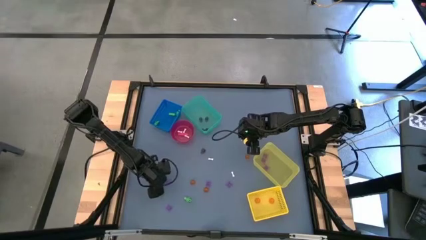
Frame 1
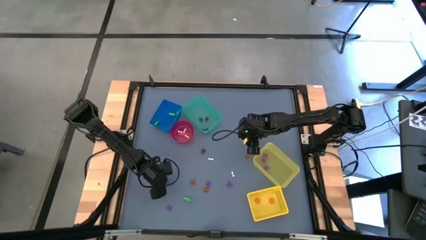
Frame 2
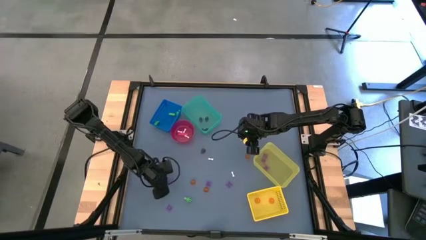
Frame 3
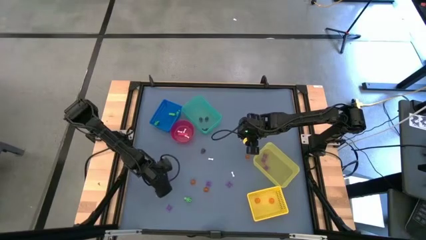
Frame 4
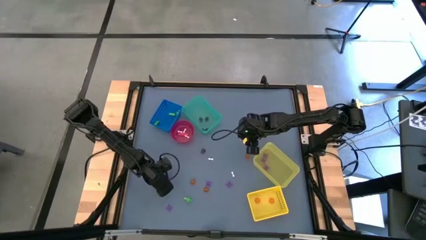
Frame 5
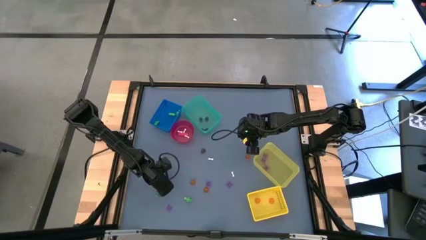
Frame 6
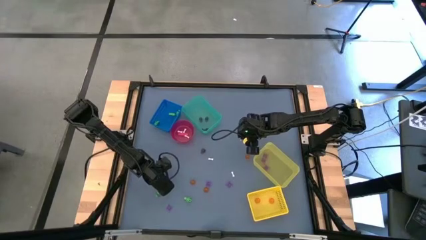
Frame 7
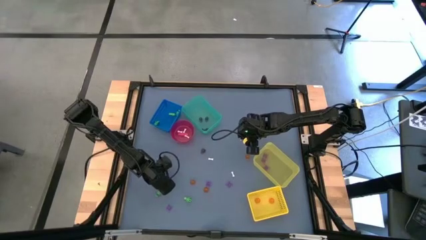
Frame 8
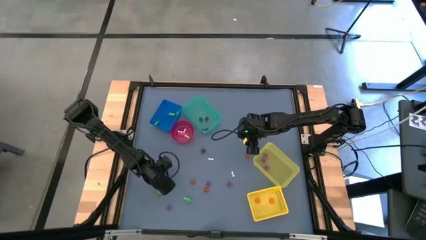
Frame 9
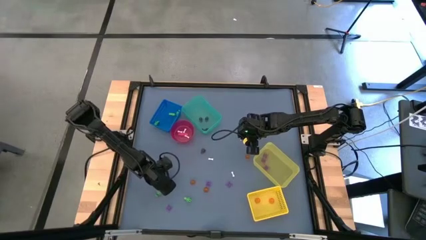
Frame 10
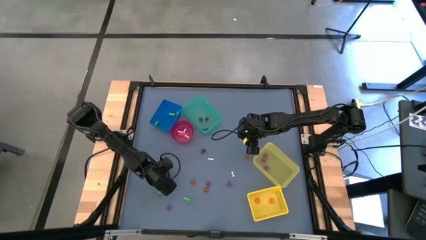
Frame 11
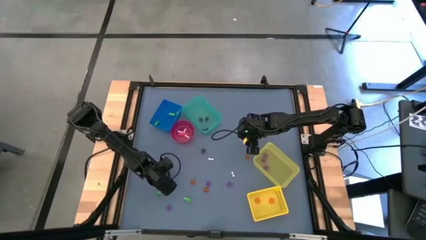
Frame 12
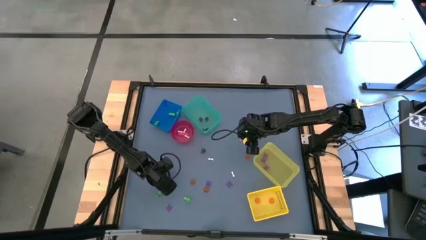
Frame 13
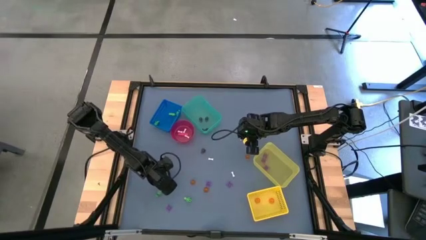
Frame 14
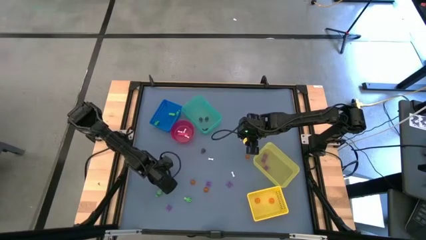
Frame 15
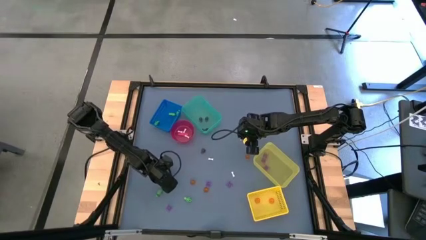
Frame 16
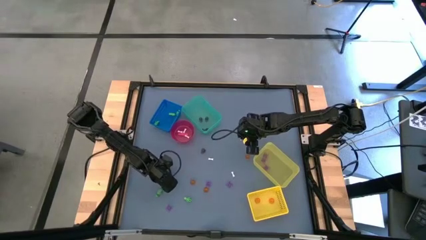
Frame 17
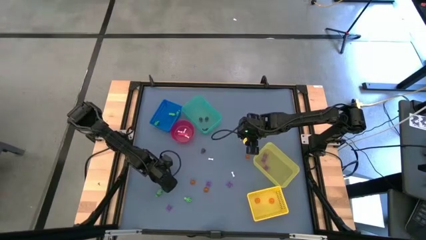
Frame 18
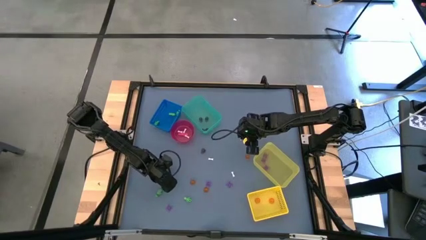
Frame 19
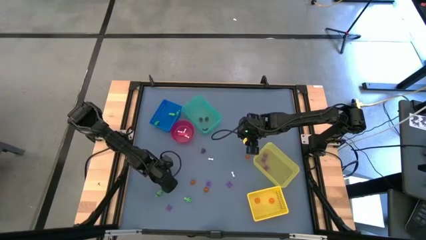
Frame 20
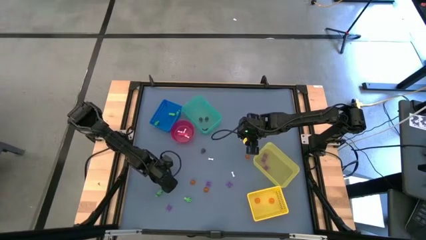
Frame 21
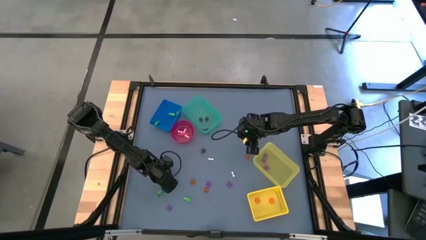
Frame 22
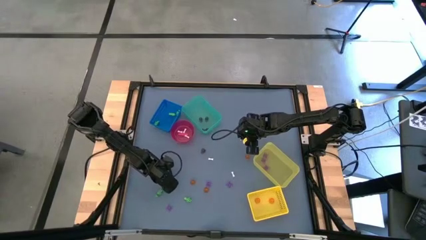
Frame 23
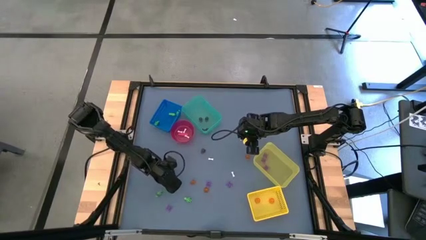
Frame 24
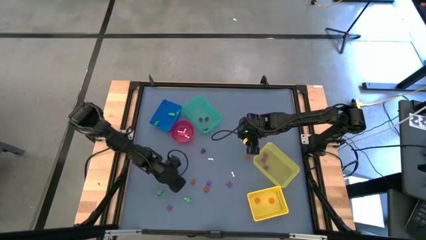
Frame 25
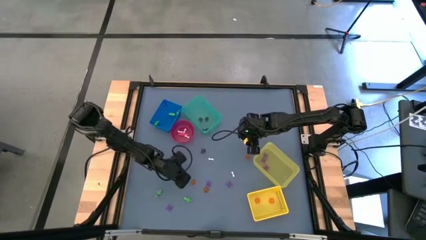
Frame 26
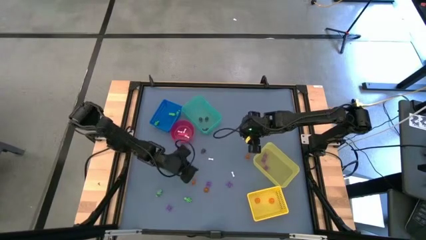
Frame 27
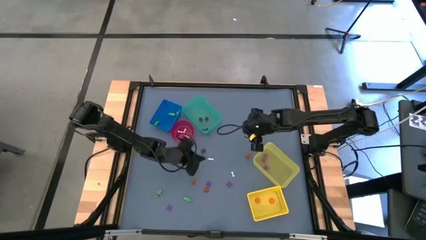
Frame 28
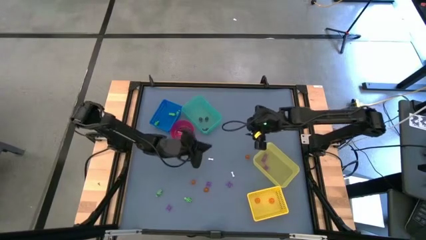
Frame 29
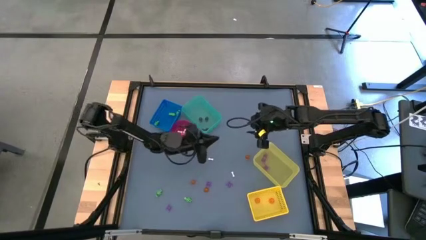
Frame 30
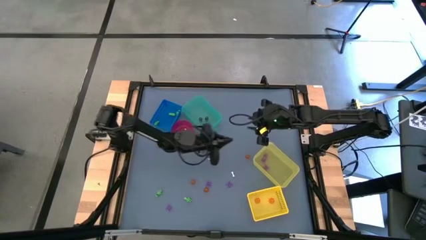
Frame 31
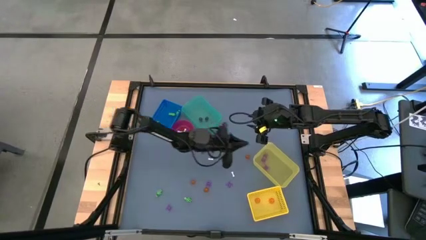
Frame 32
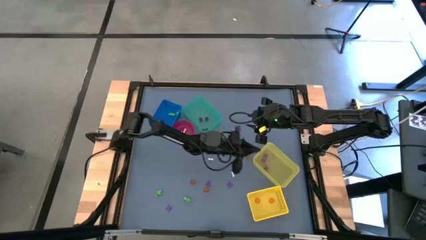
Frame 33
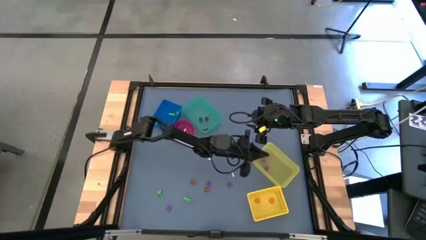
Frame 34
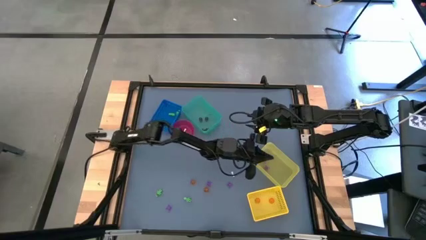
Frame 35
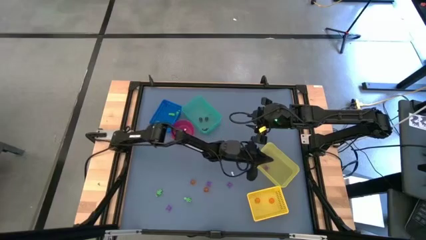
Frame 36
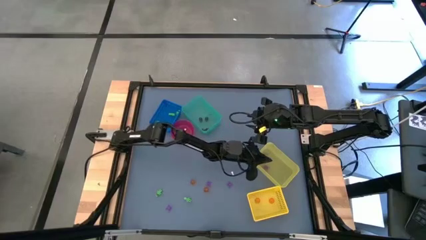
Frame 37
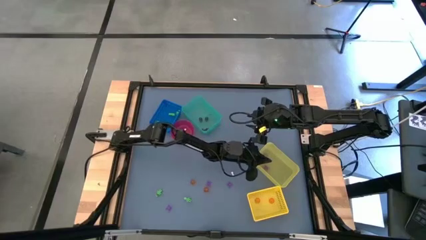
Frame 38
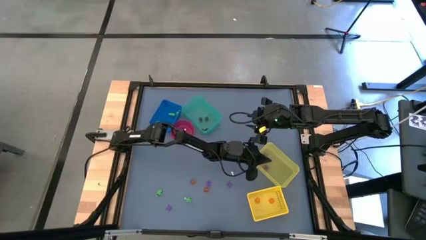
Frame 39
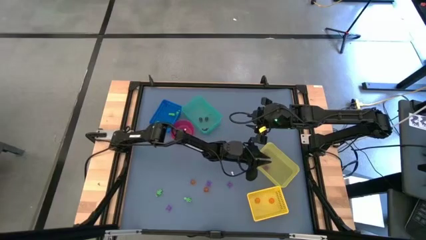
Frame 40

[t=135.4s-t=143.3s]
Task: Sort Halloween decoration
Put the purple spider toy into the yellow bin

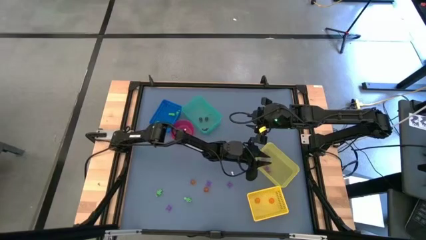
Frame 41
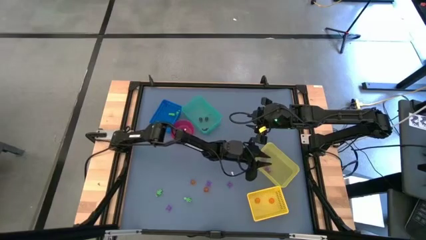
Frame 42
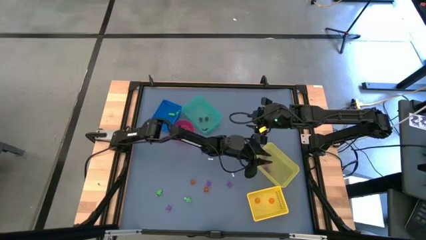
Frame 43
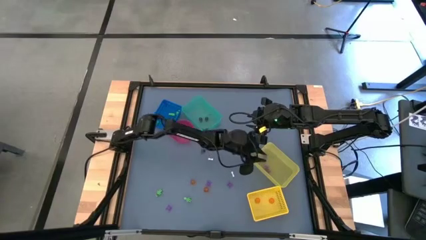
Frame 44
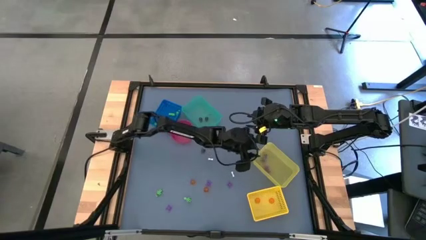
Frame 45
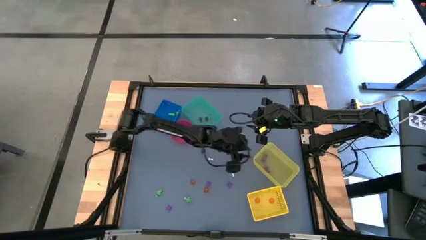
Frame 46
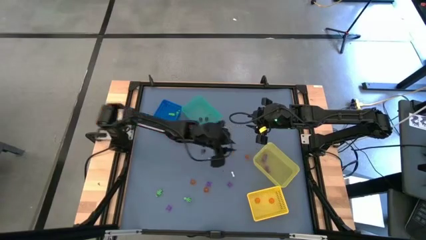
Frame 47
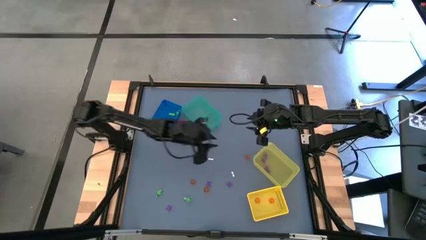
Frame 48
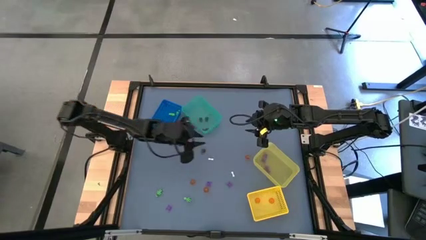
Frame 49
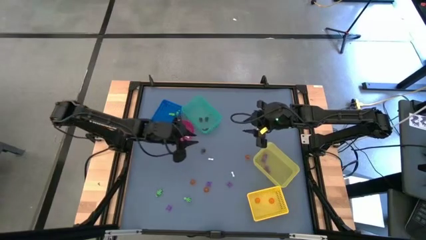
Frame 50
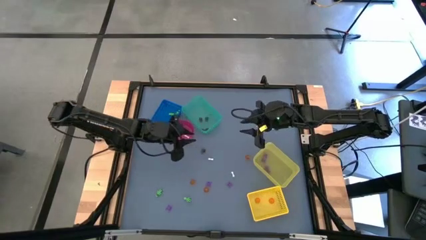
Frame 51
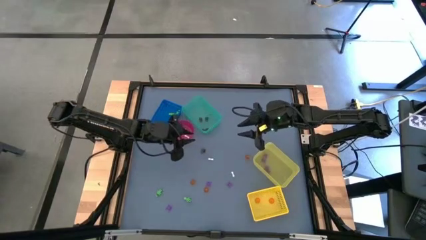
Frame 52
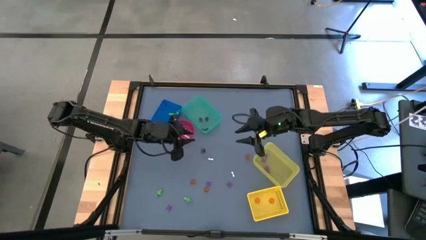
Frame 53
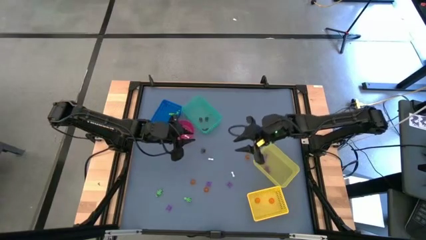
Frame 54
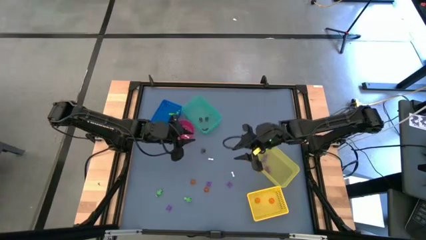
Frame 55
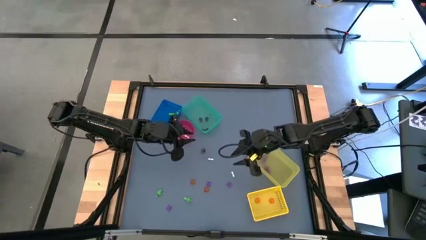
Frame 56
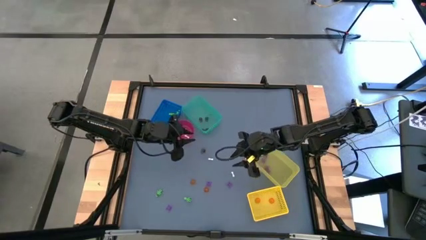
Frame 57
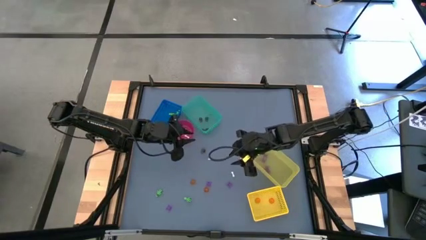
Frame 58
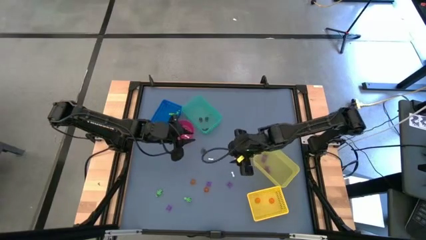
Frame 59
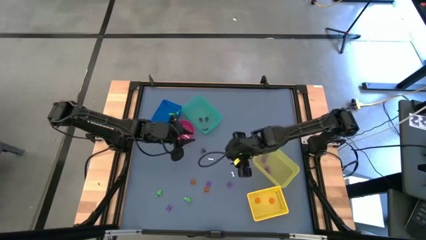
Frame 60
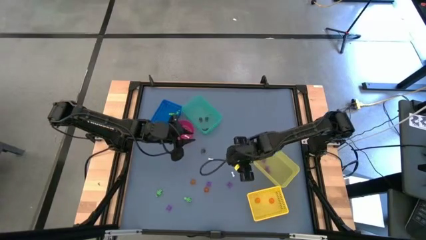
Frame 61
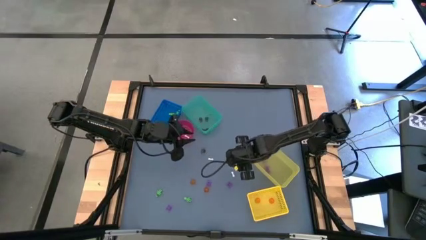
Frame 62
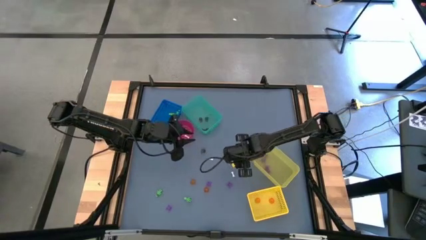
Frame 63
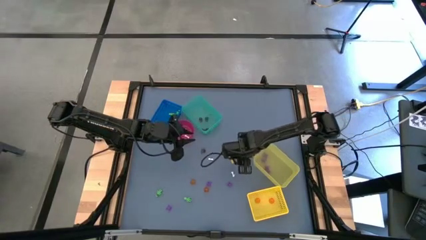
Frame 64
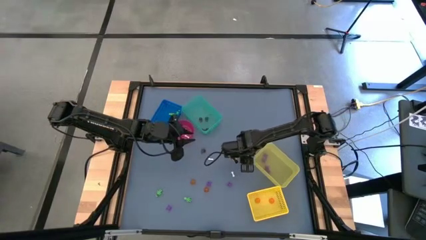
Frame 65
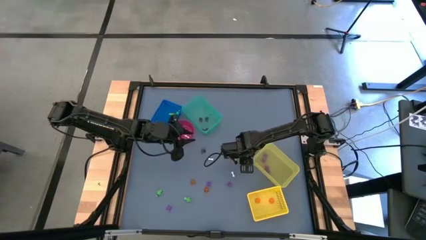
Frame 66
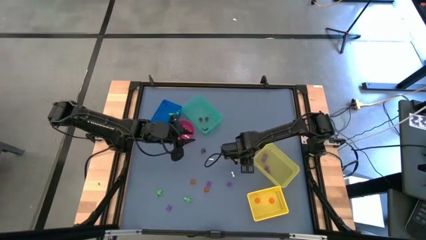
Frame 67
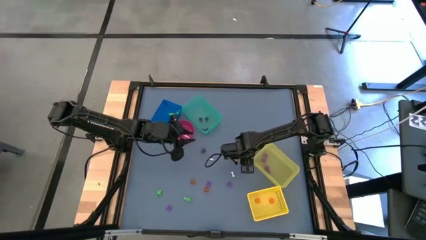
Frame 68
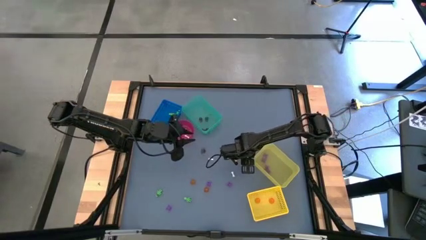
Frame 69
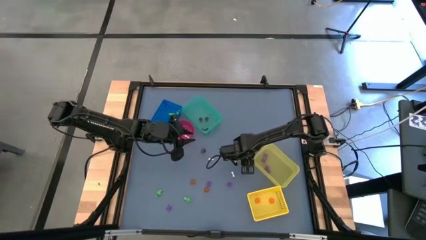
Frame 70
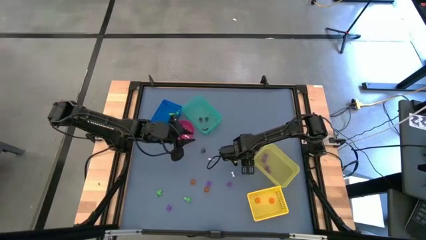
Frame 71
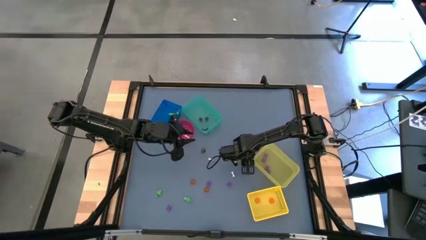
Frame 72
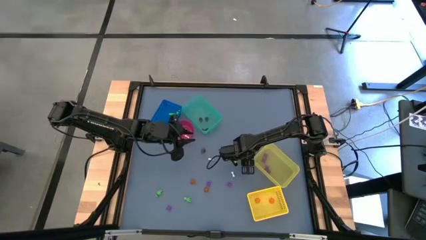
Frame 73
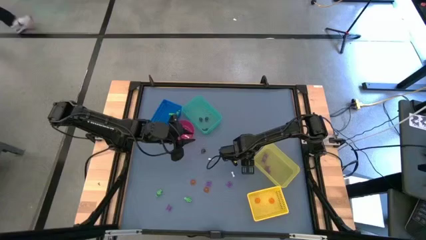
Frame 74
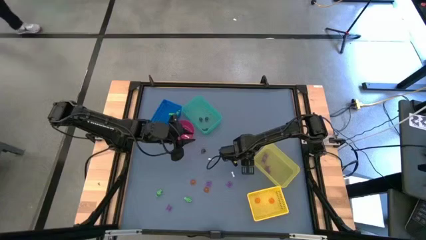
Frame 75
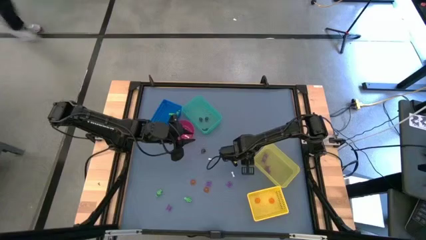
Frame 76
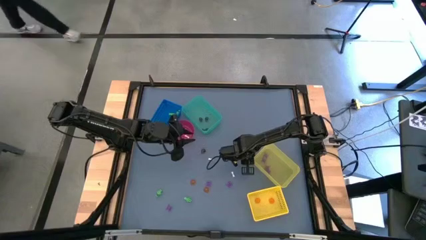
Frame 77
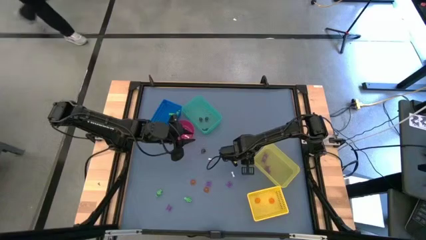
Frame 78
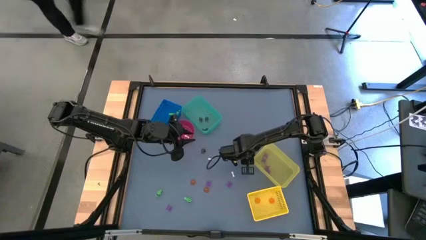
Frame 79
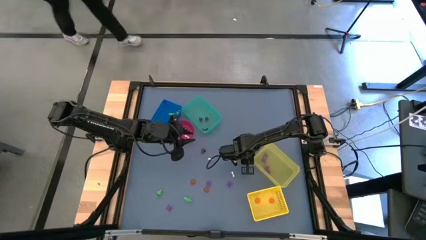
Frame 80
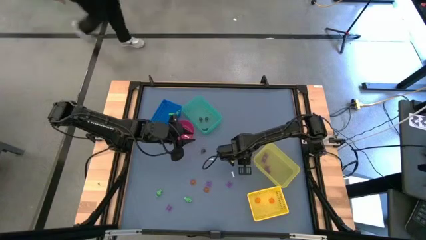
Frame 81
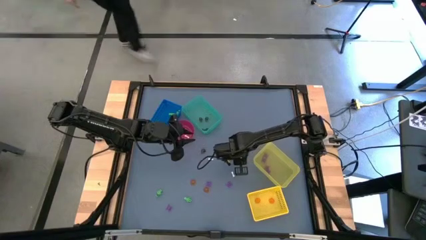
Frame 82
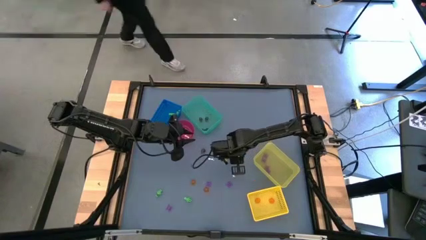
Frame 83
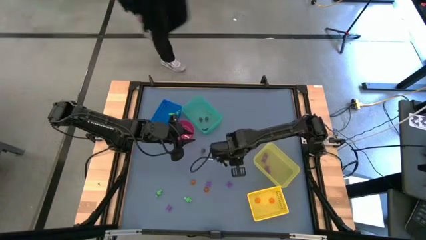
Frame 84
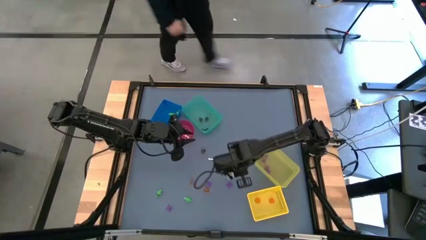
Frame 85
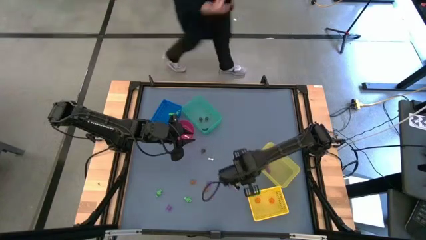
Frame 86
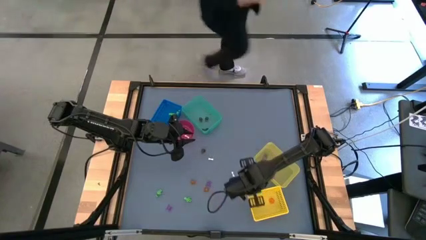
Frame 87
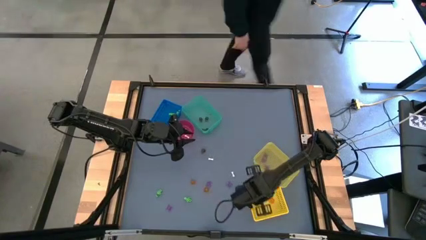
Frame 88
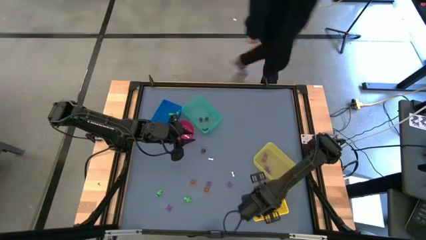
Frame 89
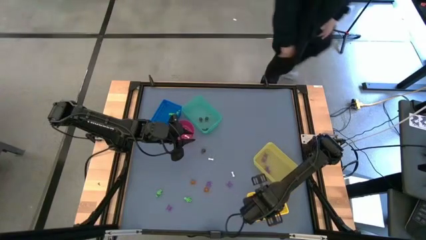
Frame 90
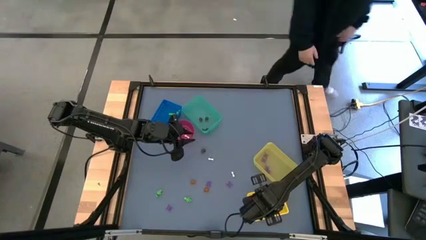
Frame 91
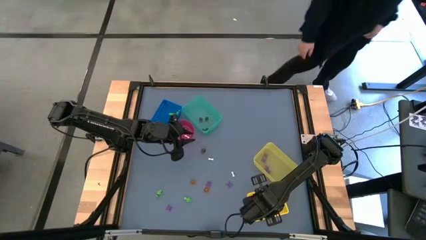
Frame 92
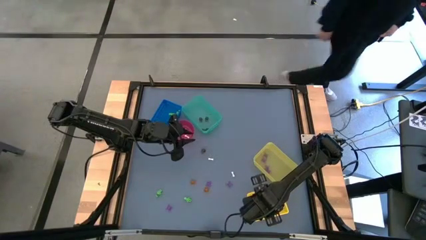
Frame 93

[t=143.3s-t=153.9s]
Put the orange pumpkin toy into the yellow bin
